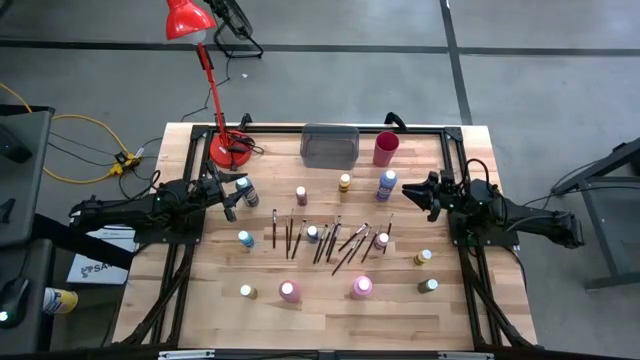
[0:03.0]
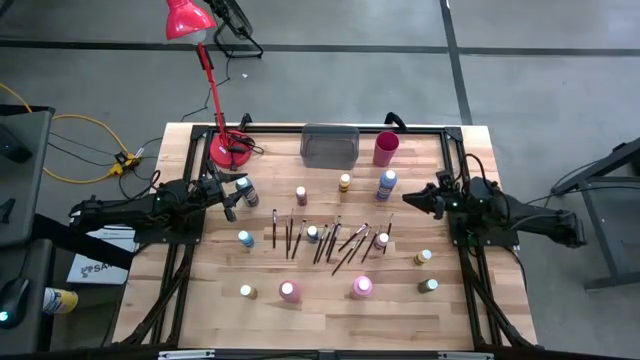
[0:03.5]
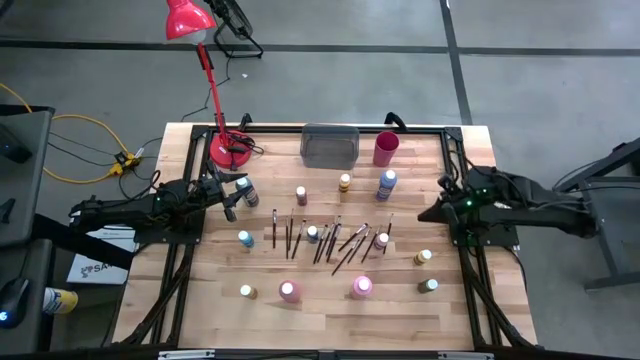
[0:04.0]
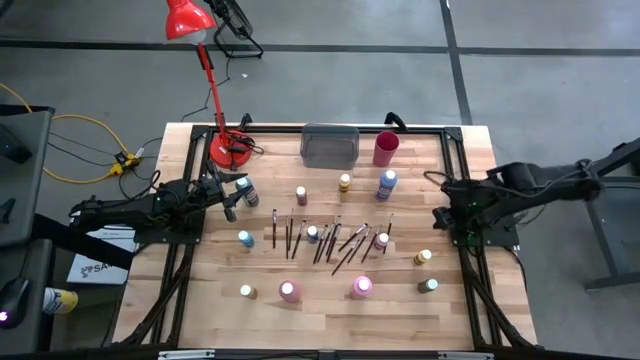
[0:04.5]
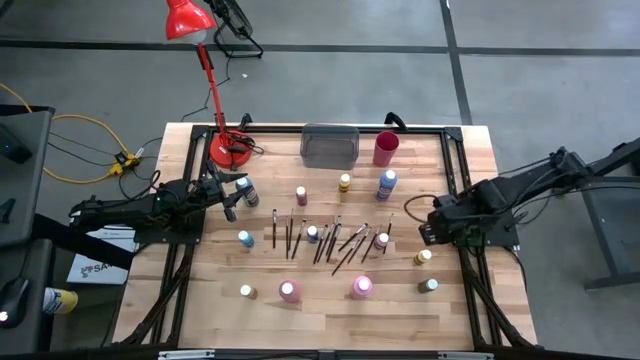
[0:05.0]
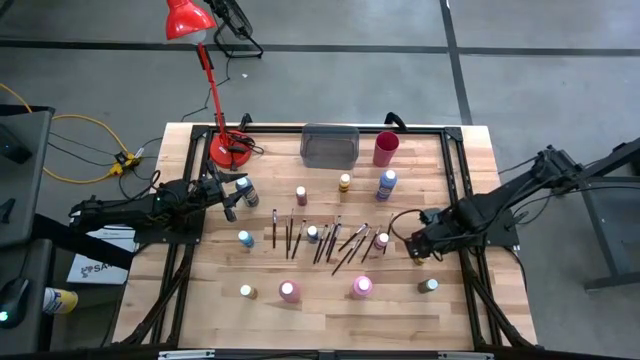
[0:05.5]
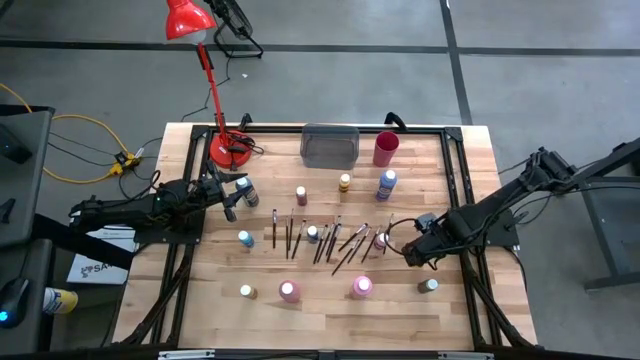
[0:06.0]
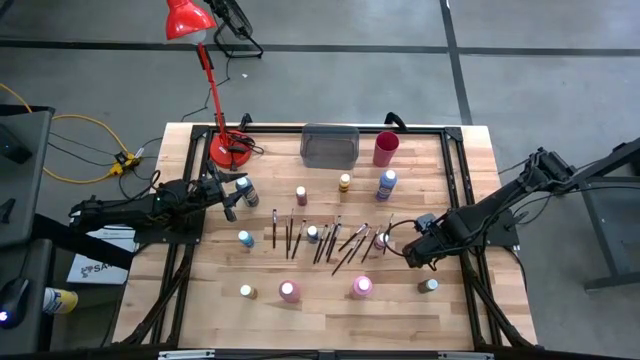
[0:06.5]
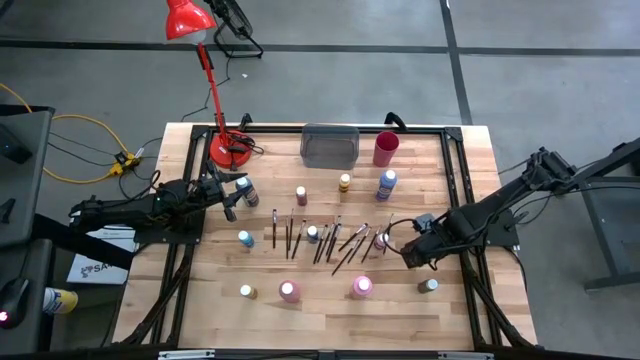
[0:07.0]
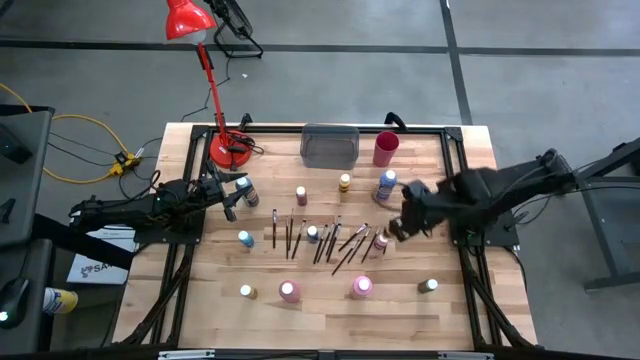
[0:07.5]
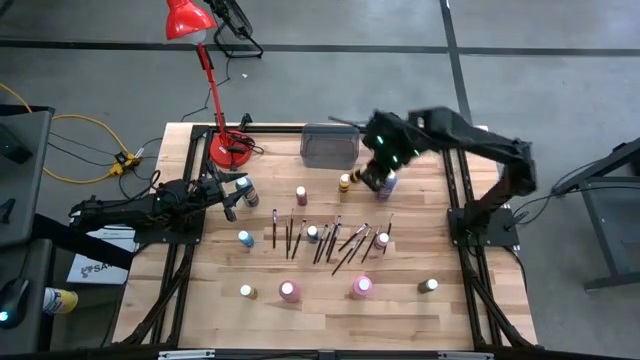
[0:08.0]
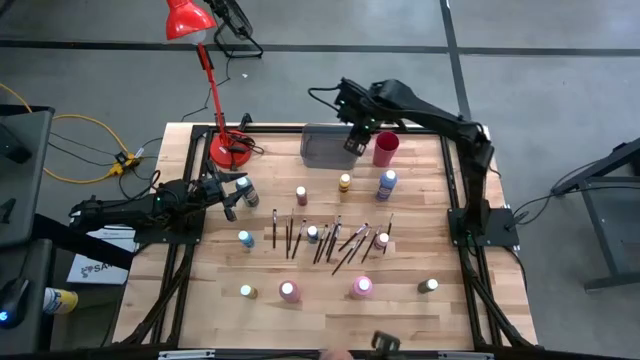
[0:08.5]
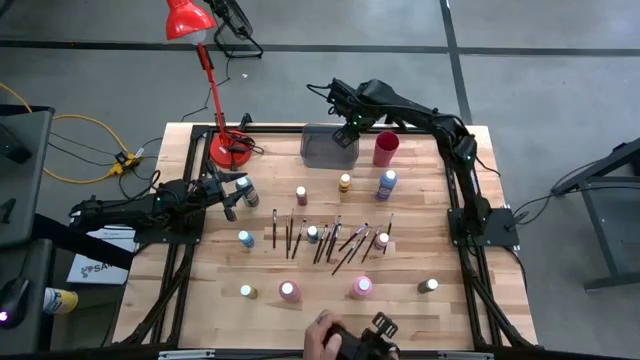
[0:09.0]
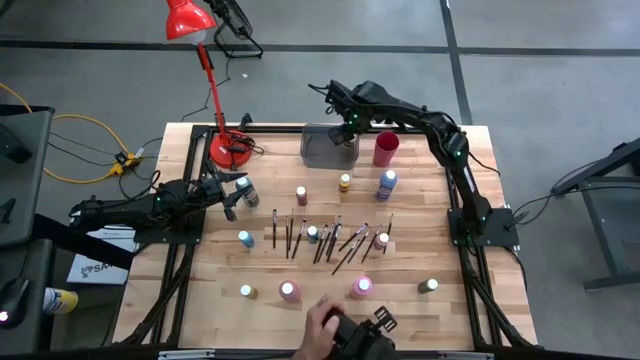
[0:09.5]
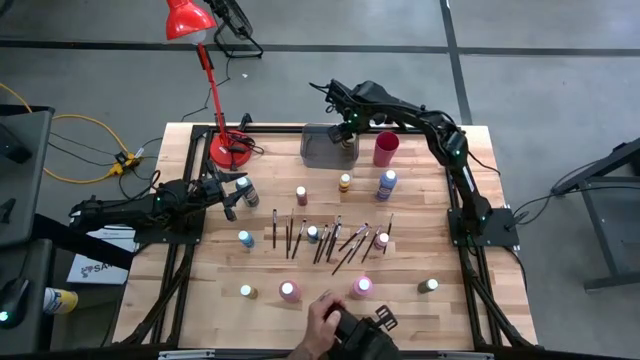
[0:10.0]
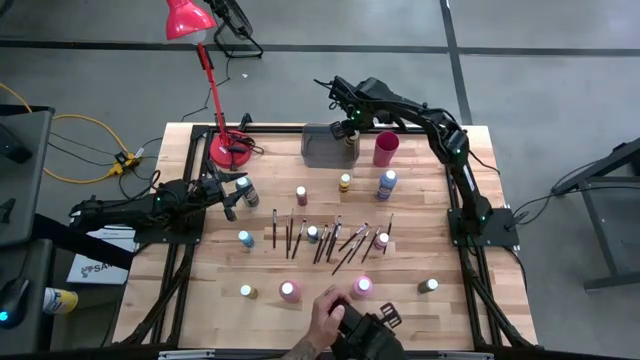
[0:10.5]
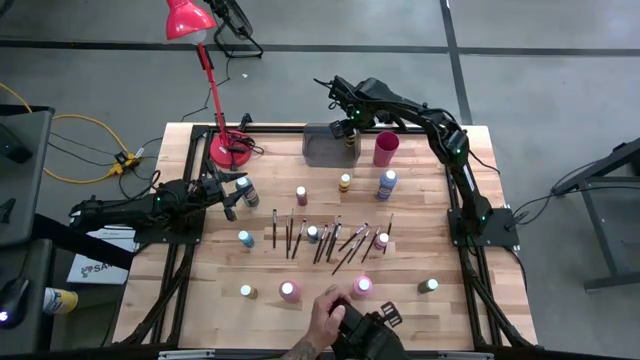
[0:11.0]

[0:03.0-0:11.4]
Task: Pick & Place Paint Supplies
Put the small light yellow paint bottle into the black bin

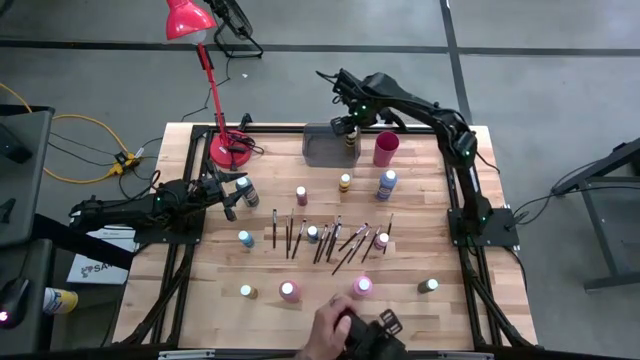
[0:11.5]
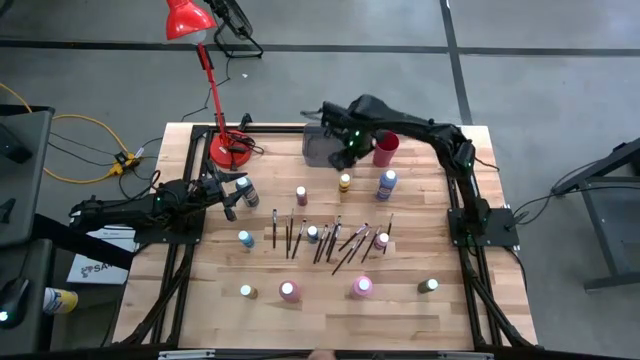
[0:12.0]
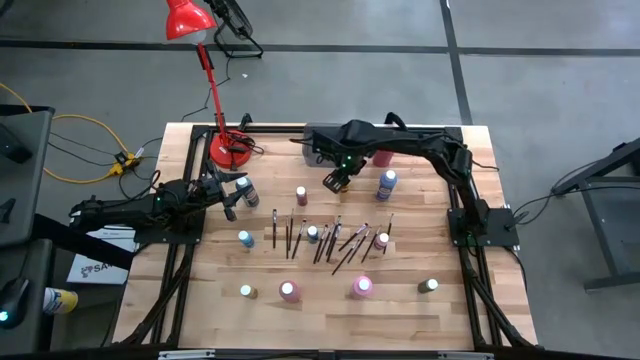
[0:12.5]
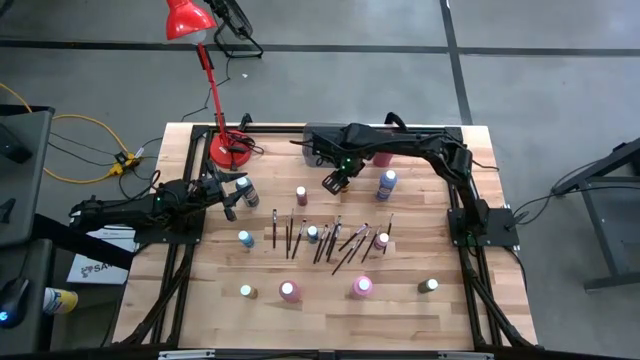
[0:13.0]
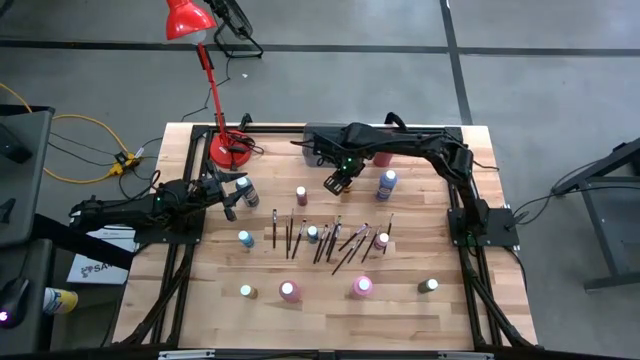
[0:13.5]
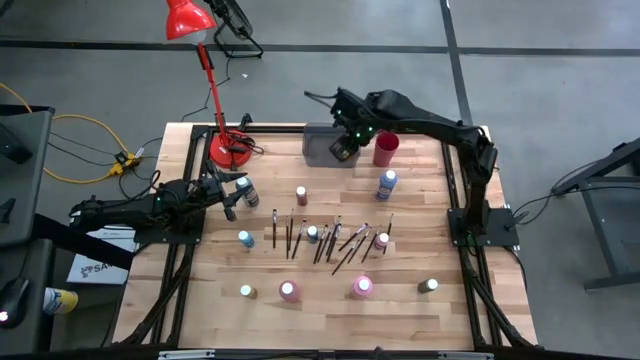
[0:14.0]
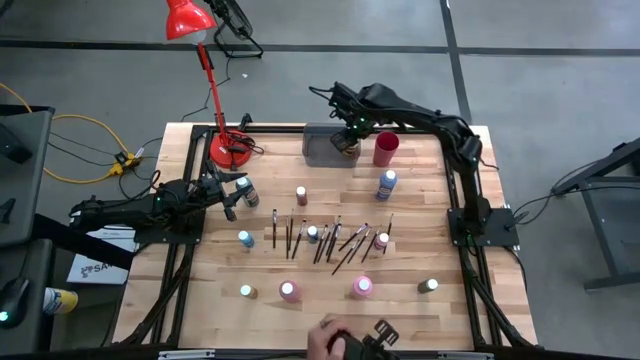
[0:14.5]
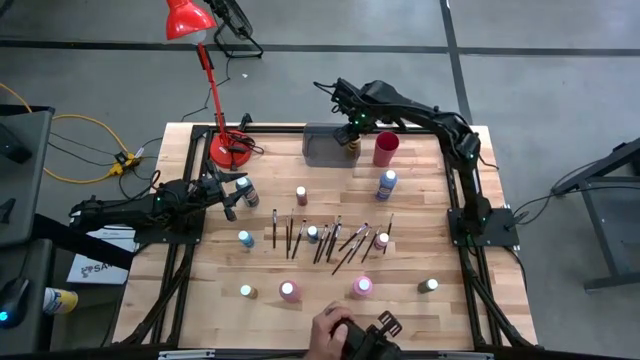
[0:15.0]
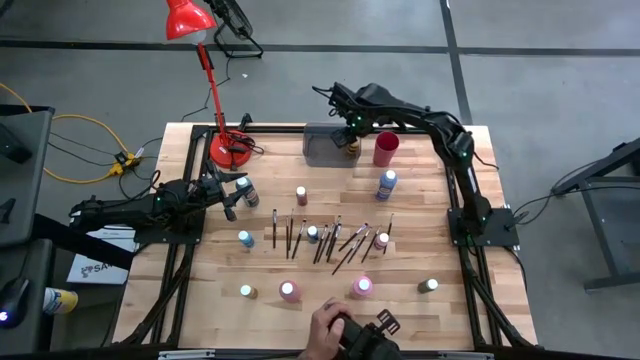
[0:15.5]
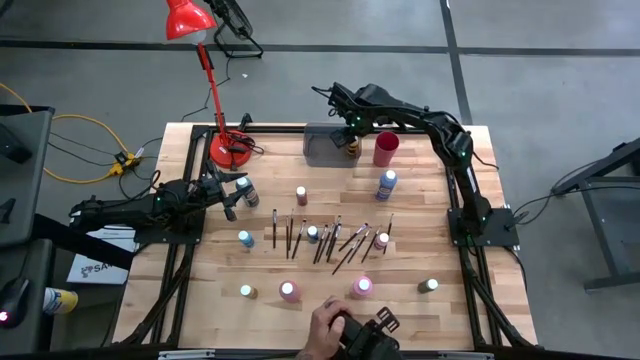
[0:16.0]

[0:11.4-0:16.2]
Put the small yellow paint bottle into the black bin

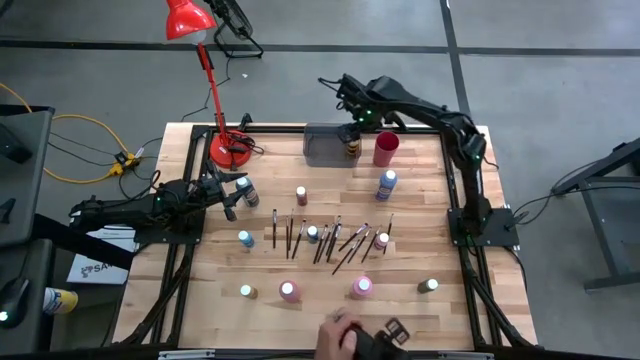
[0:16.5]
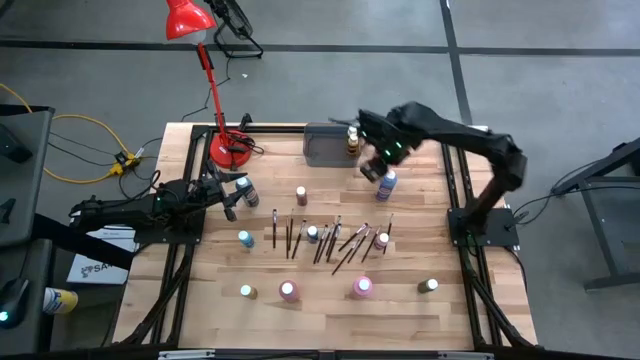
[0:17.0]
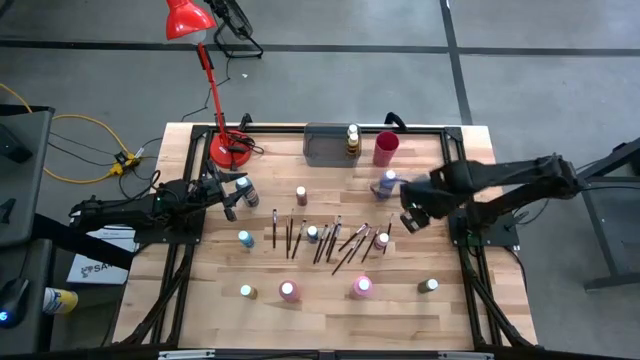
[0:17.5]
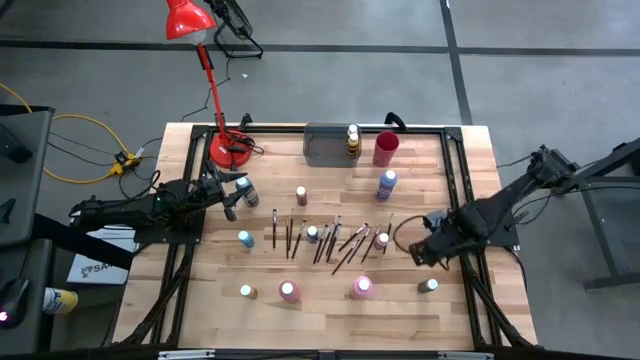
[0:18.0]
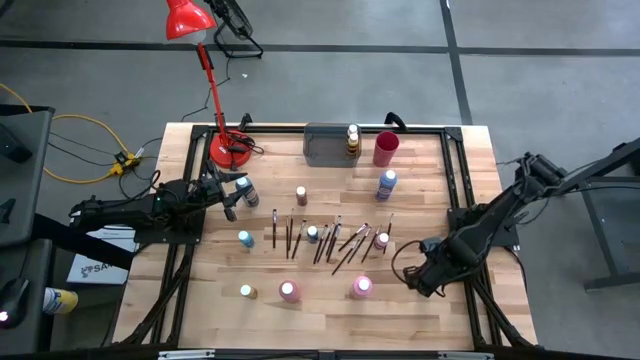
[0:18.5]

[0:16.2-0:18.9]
Put the small green paint bottle into the black bin

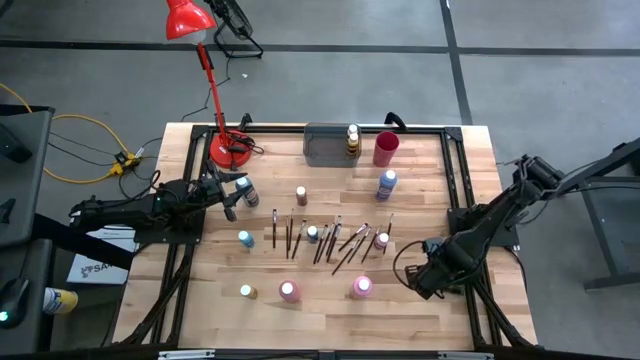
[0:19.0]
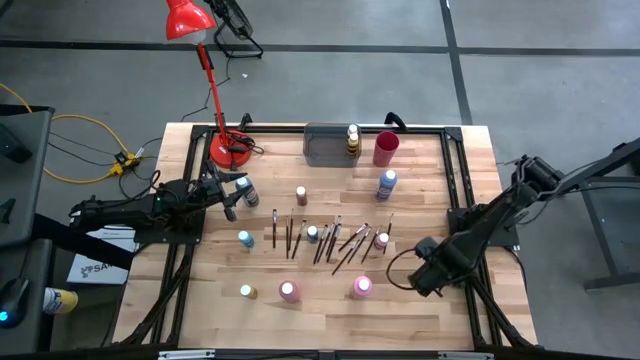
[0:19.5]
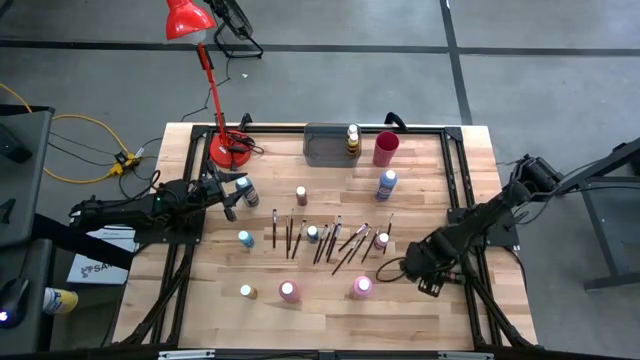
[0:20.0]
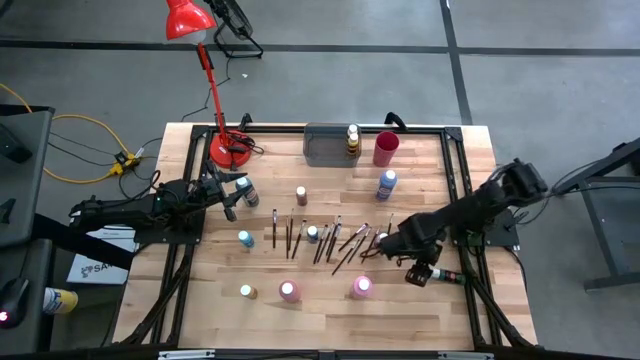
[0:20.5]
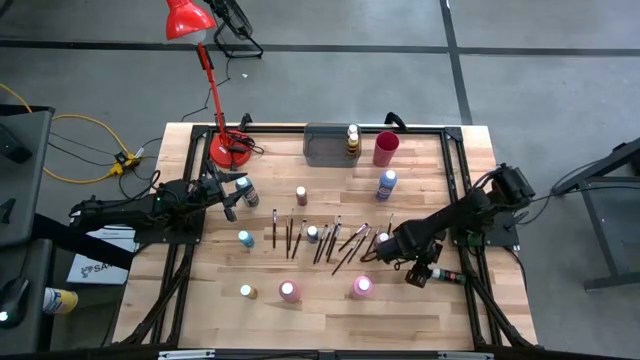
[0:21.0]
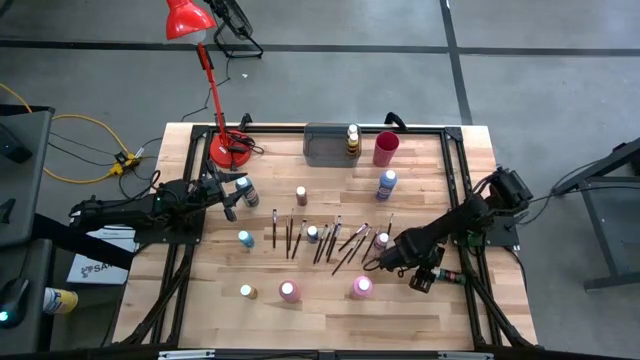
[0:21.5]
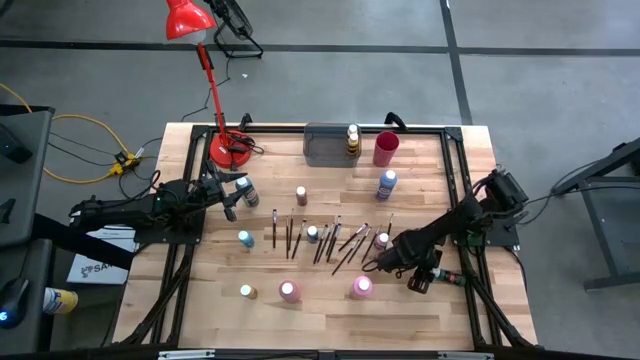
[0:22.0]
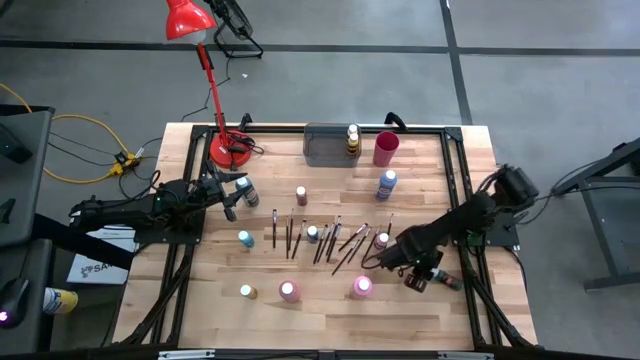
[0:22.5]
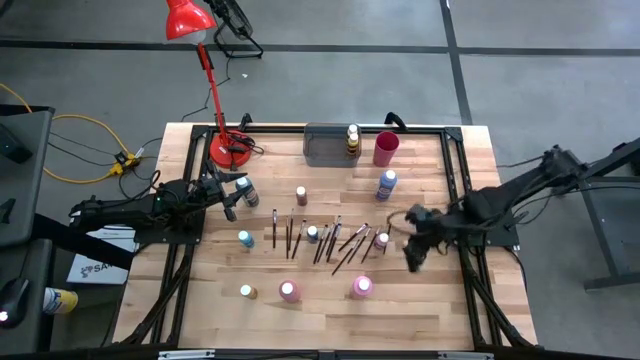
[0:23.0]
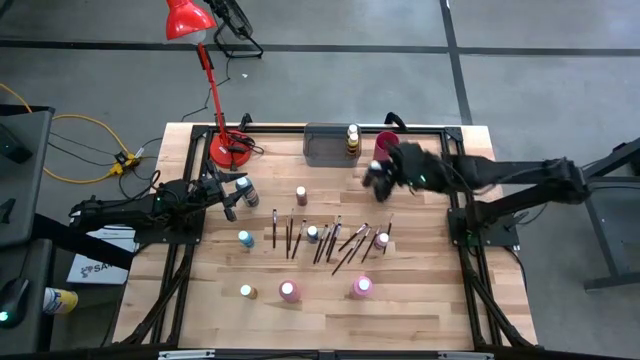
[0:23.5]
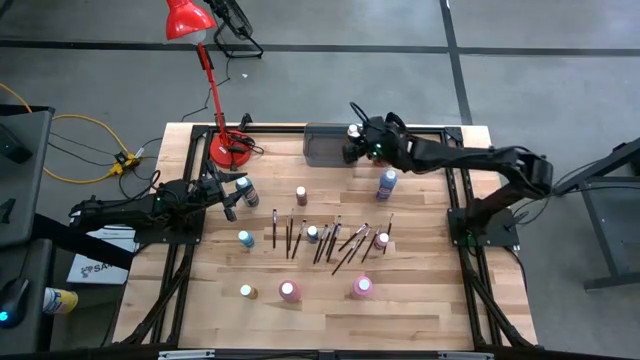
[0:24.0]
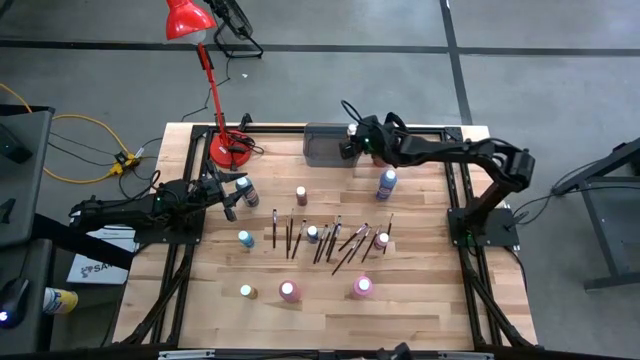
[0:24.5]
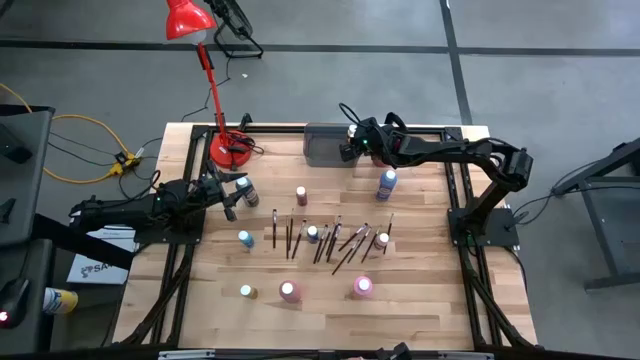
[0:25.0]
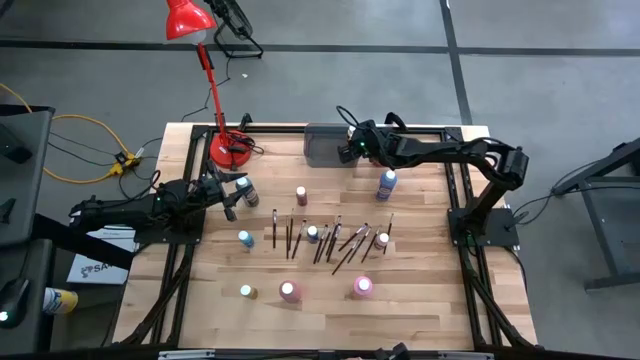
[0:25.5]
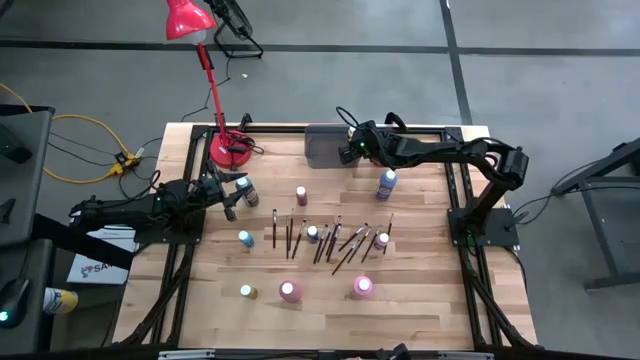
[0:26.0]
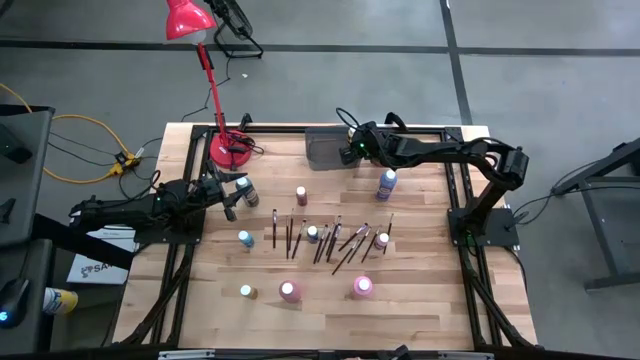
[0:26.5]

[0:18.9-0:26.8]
Put the small green paint bottle into the black bin
